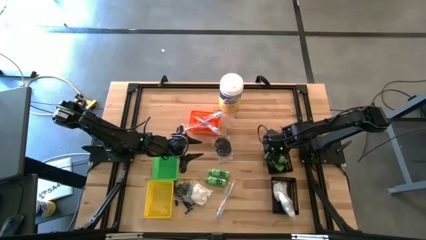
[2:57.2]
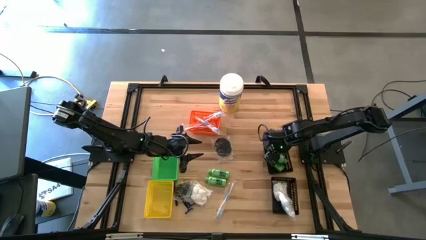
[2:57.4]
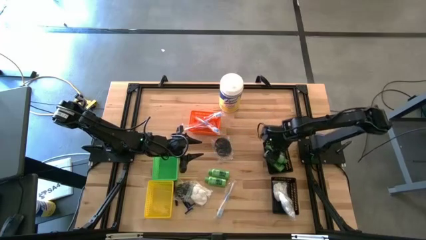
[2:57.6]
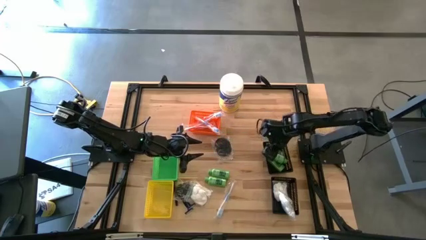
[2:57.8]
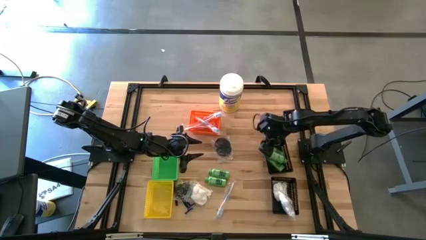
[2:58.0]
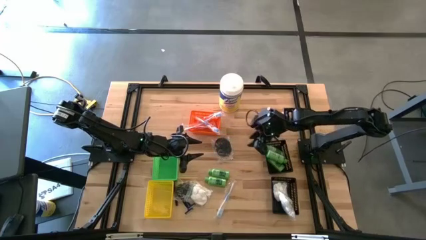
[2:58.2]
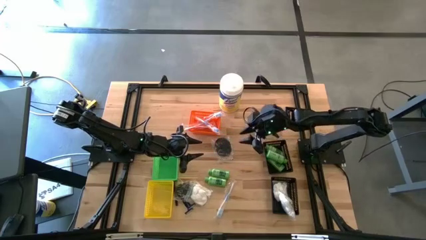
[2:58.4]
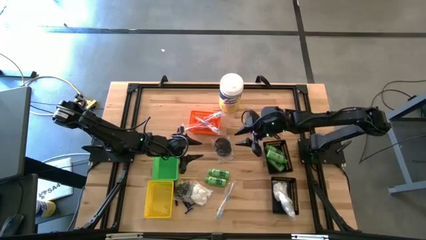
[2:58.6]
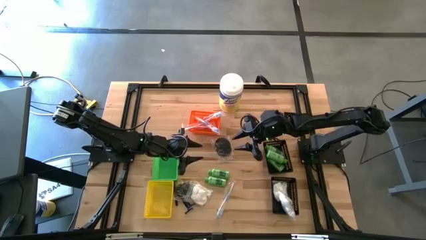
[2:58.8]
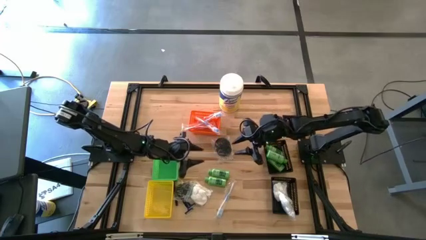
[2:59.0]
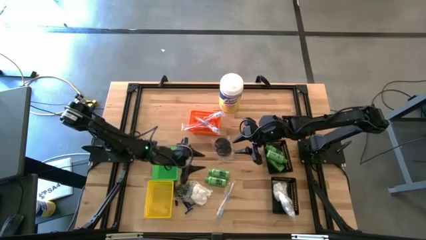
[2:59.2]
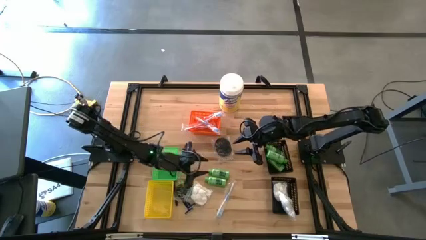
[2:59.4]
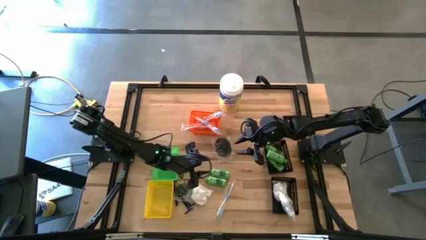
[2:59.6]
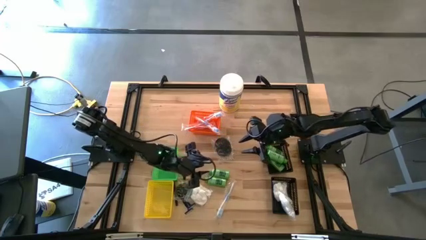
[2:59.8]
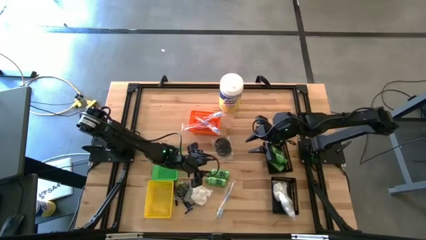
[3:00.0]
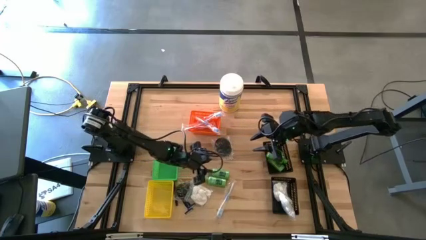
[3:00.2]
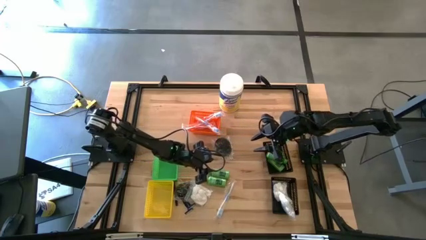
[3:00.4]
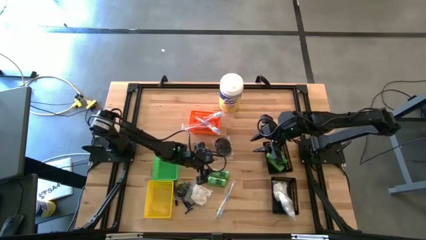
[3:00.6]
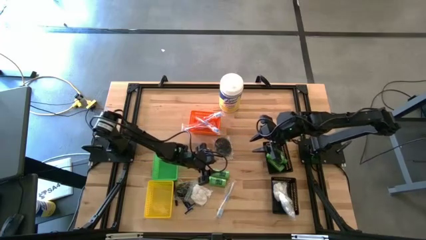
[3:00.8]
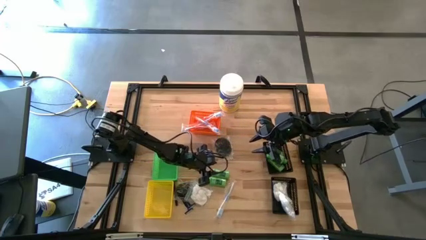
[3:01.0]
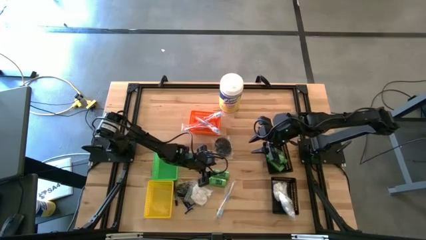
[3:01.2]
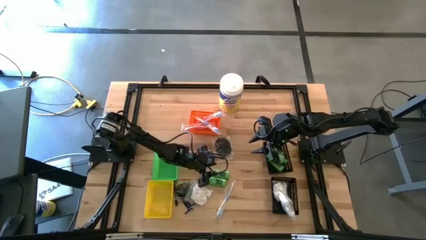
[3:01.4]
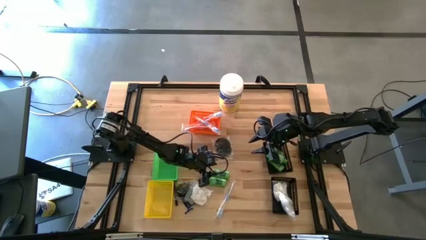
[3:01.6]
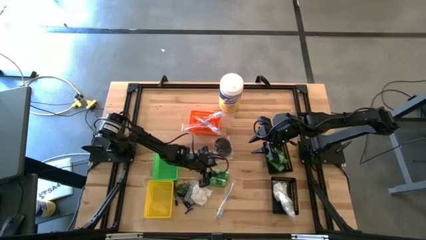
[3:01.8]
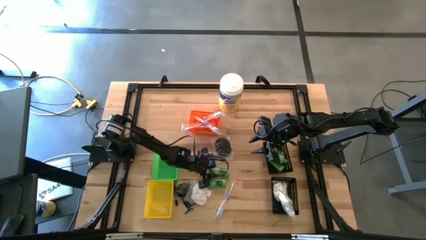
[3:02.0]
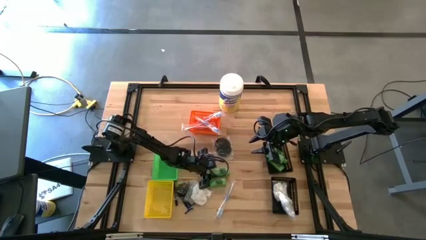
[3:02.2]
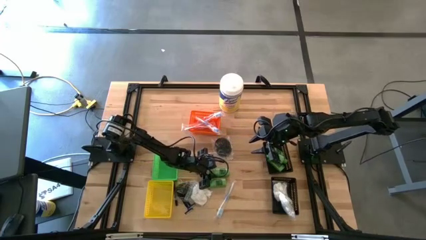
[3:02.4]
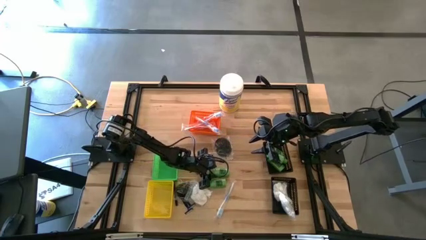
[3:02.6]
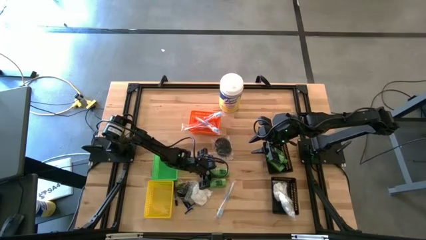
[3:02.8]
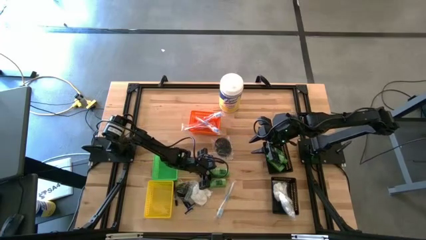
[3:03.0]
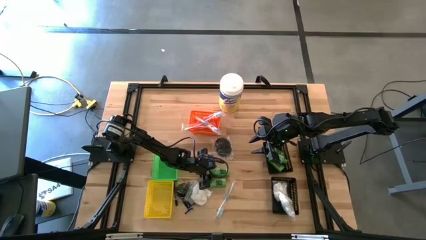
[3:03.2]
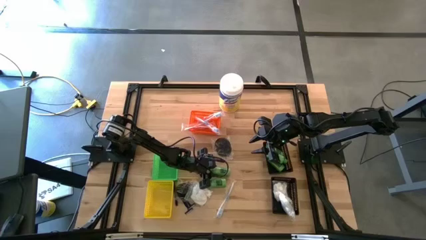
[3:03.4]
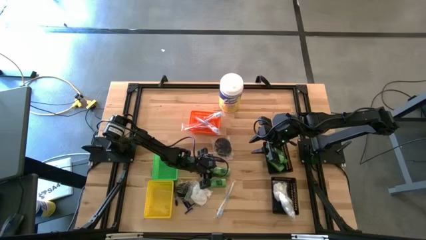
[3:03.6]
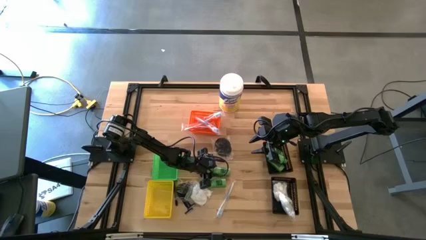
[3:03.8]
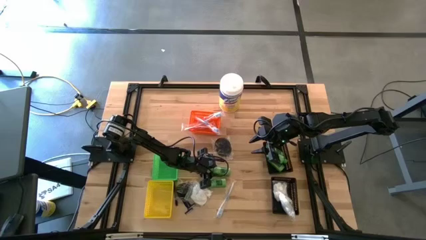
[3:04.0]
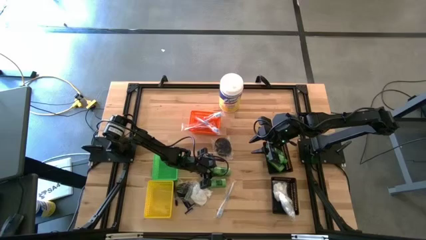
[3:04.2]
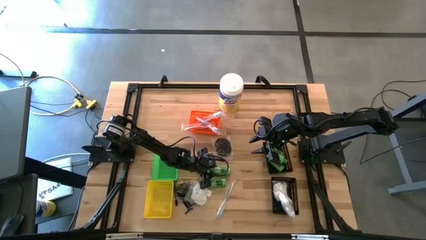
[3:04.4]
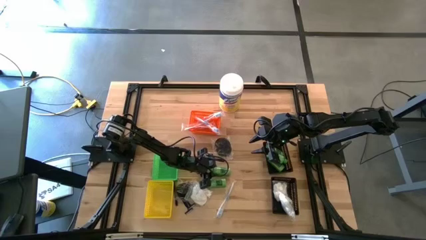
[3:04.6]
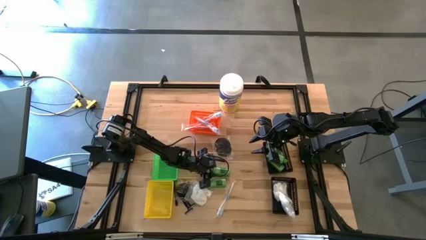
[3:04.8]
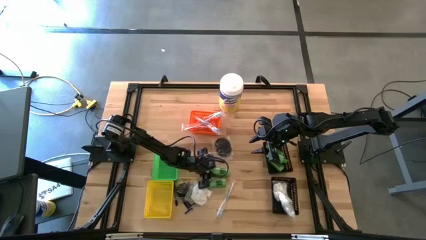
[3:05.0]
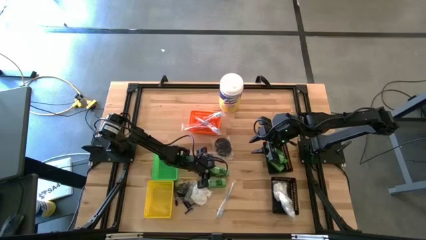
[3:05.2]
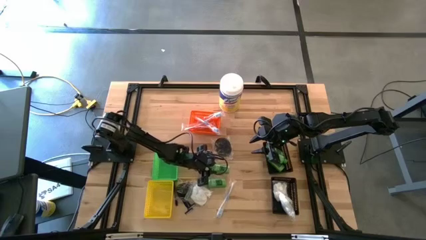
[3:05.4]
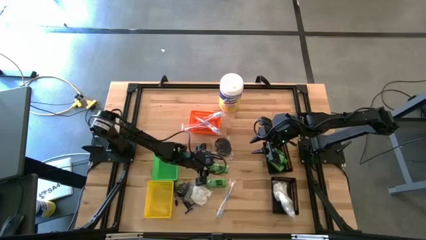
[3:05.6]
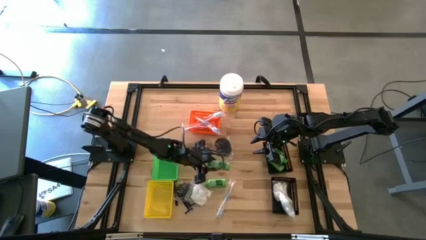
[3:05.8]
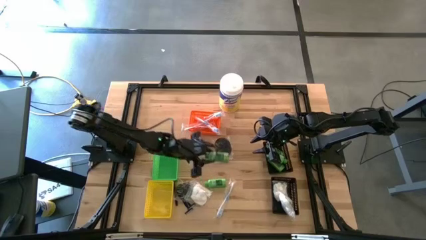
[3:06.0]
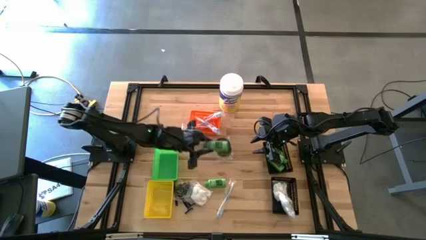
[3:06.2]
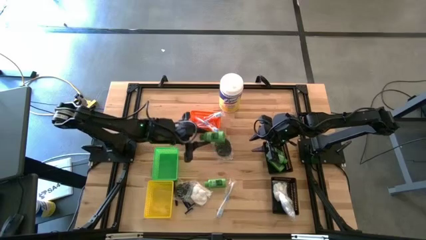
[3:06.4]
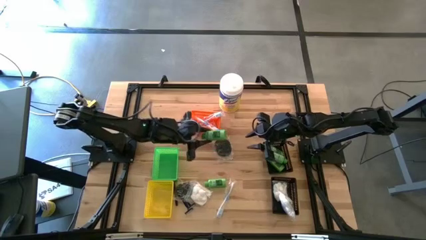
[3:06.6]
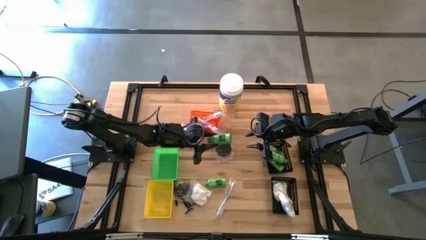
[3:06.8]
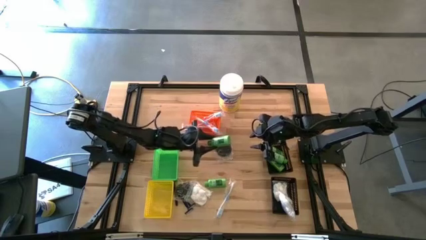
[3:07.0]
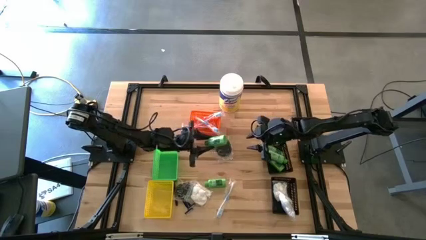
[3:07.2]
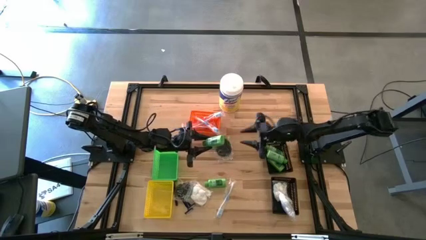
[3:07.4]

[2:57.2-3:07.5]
Task: Pick & Place Travel size toiletries
Put the green shampoo into the top black bin

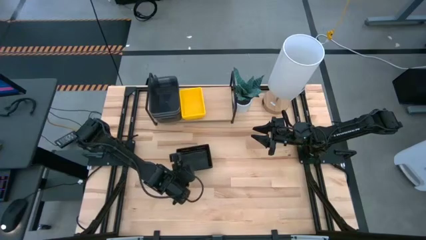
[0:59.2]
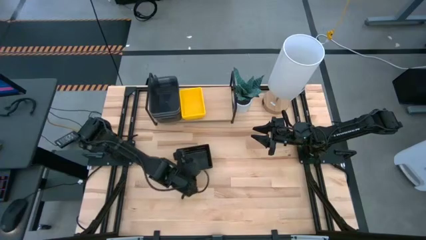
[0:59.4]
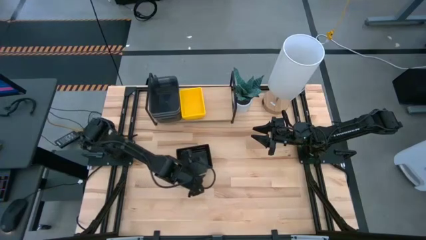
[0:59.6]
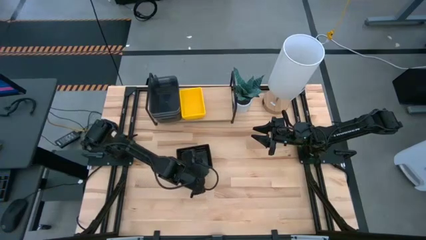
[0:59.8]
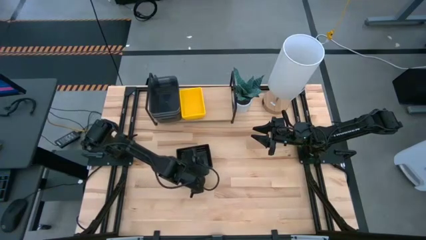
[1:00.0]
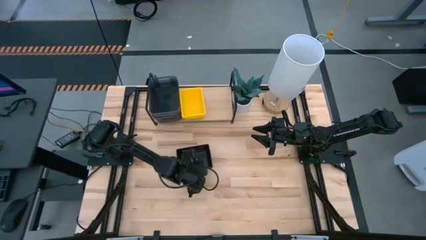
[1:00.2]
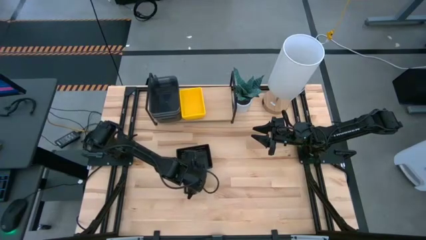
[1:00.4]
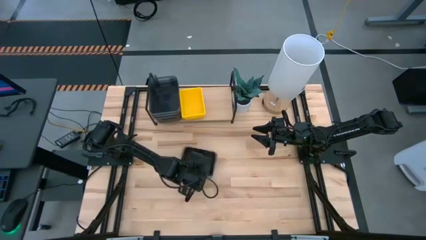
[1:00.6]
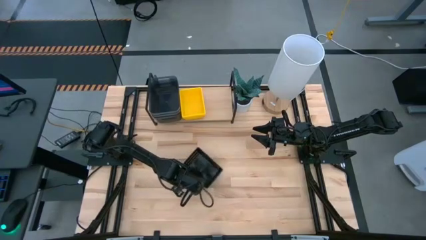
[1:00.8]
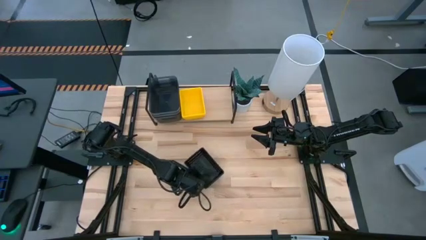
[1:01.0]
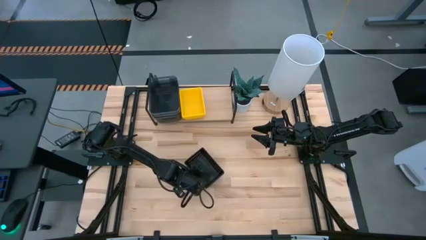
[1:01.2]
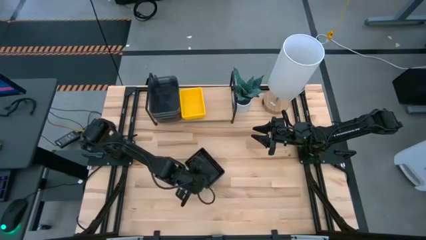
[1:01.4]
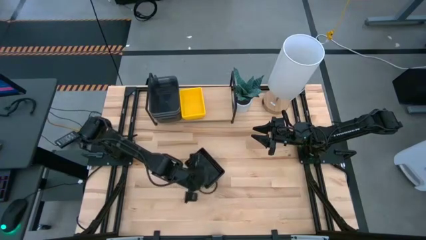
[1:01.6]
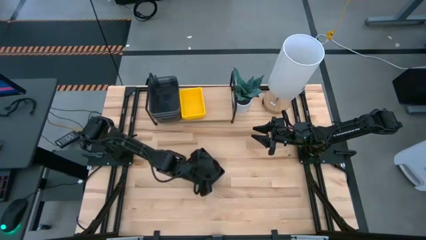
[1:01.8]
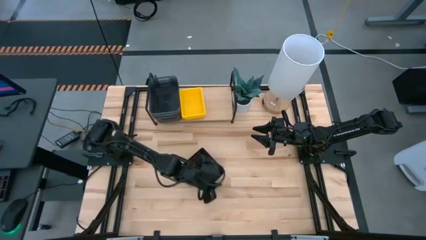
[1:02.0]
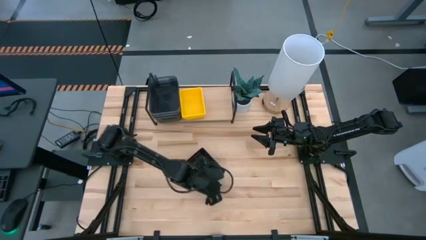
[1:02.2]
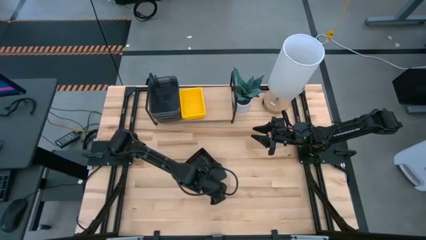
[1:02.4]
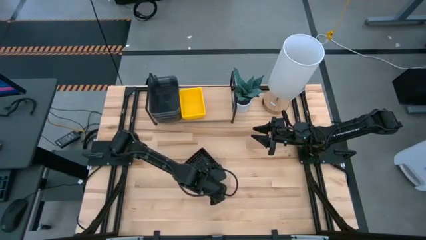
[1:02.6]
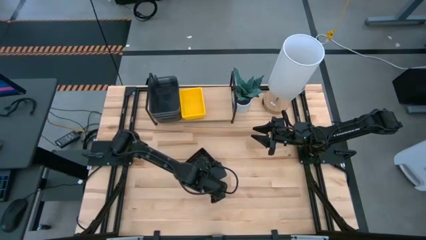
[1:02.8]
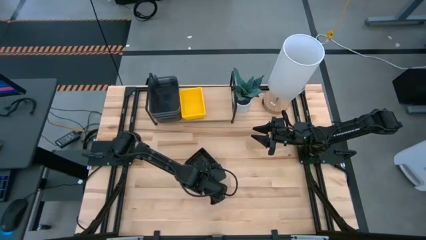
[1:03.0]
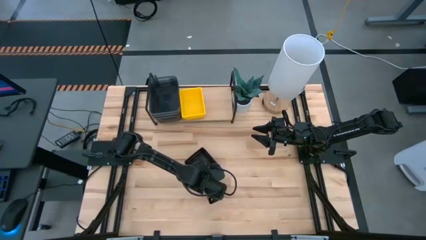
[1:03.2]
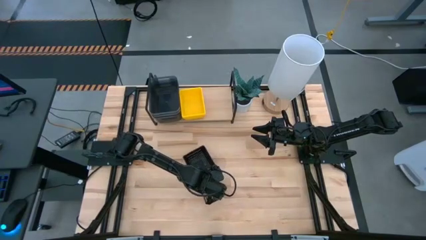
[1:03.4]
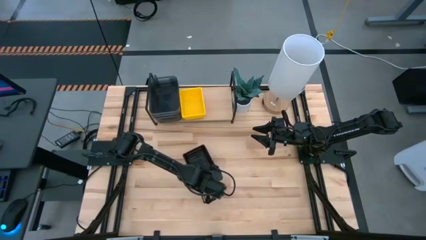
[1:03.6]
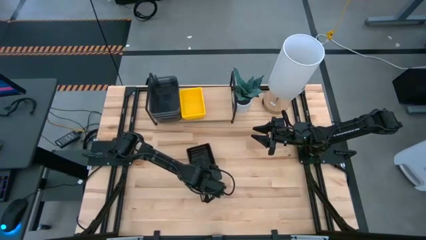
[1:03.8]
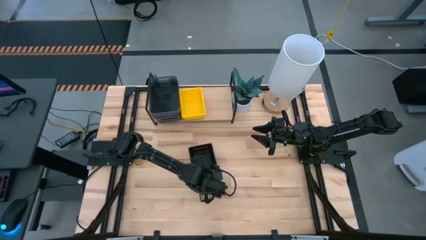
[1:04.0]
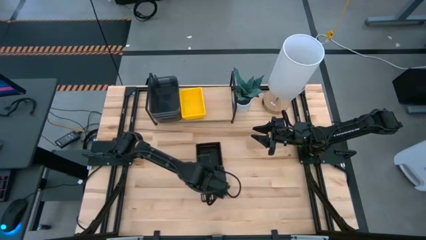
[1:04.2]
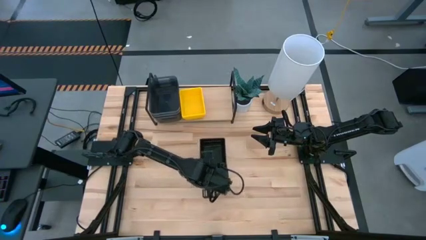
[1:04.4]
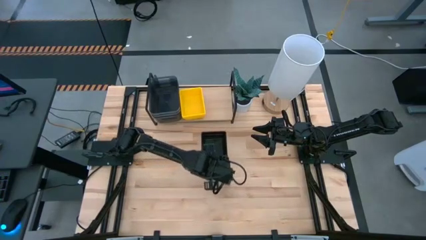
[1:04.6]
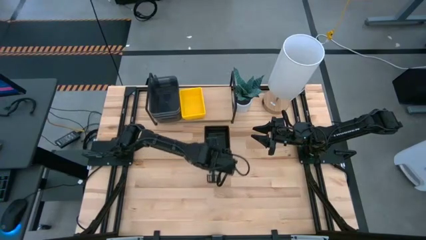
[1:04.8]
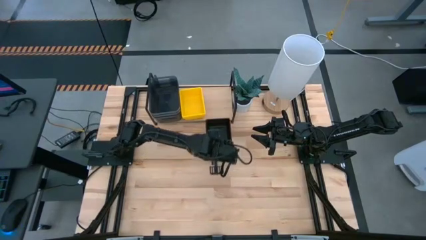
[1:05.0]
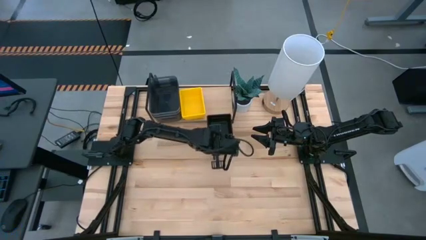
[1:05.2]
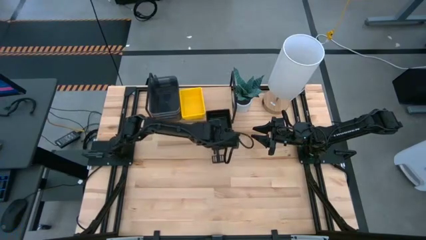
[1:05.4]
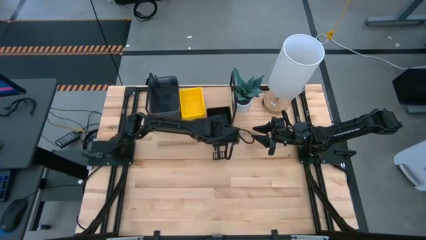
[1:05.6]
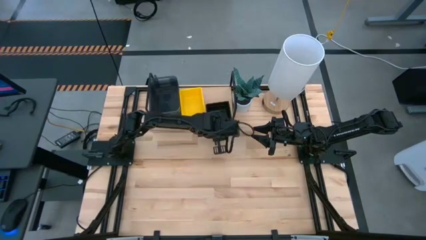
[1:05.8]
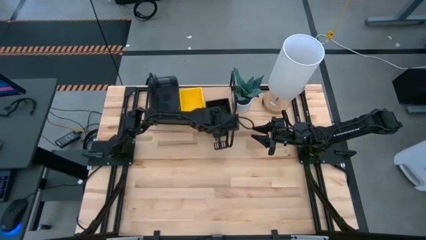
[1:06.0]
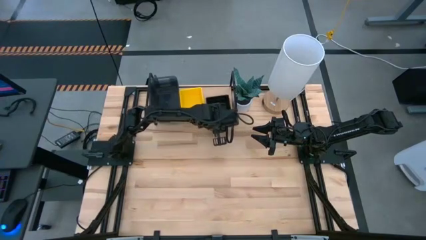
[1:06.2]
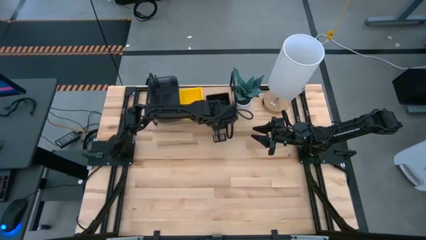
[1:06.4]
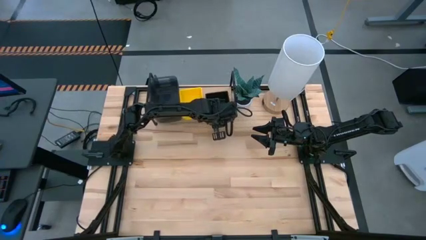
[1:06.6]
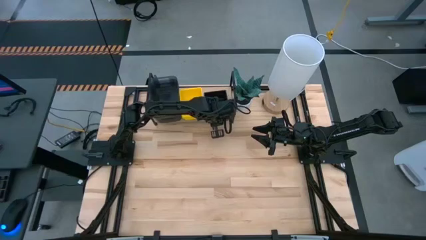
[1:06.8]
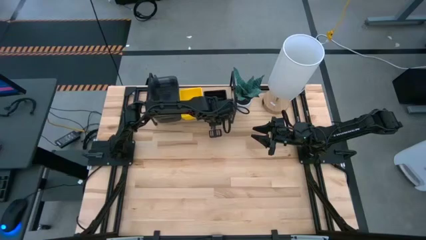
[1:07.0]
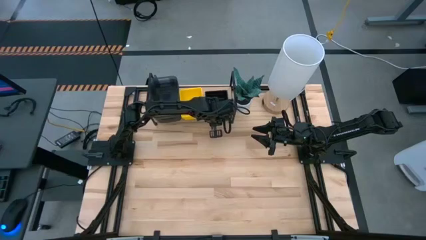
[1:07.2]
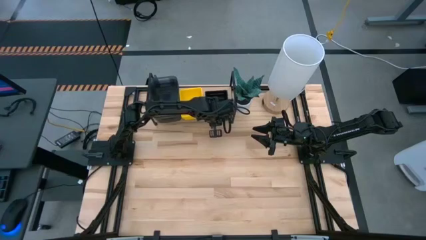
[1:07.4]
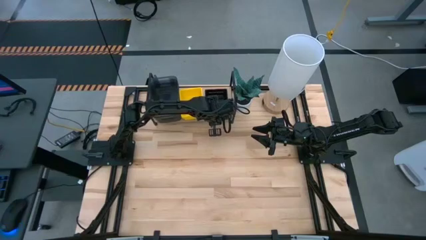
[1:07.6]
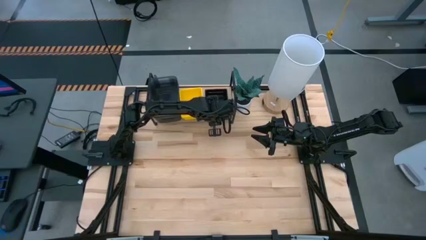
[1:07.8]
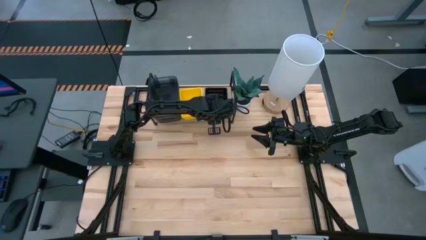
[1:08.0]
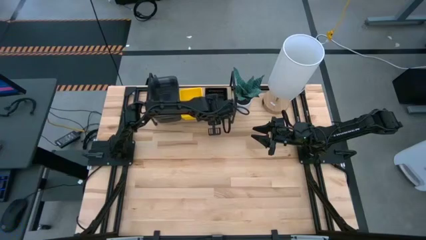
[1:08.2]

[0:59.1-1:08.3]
Task: Stack baskets on shelf by color
Put the stacked black bin on the shelf
